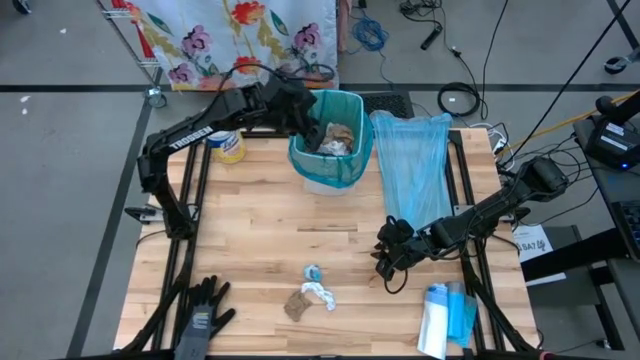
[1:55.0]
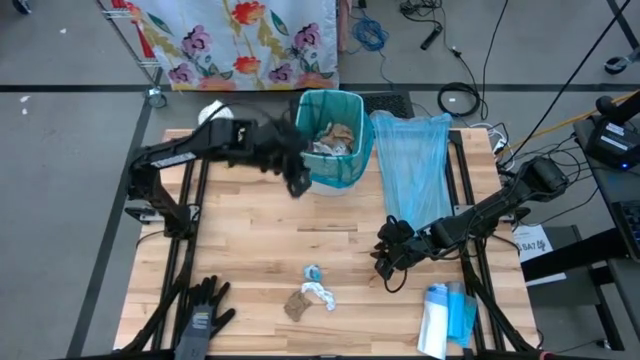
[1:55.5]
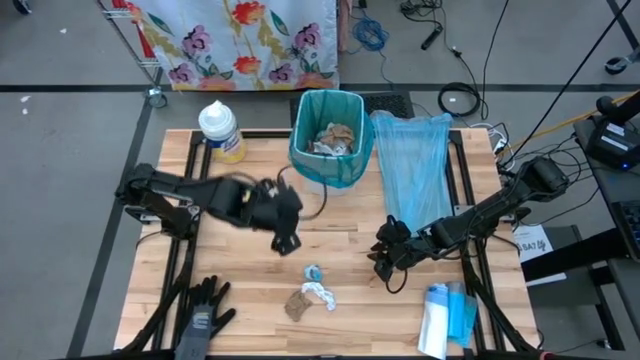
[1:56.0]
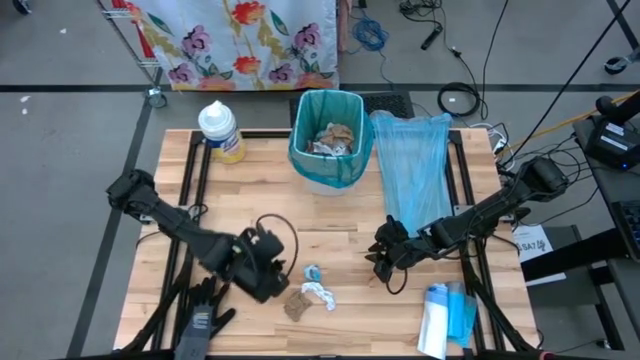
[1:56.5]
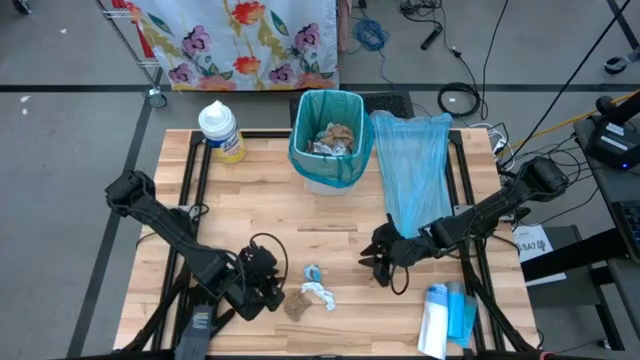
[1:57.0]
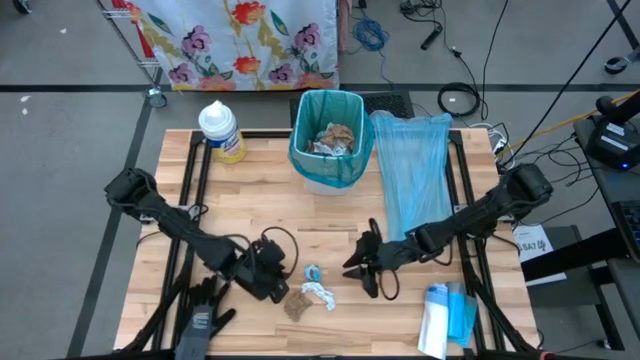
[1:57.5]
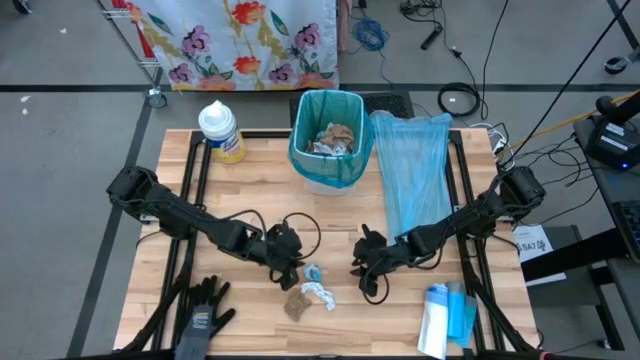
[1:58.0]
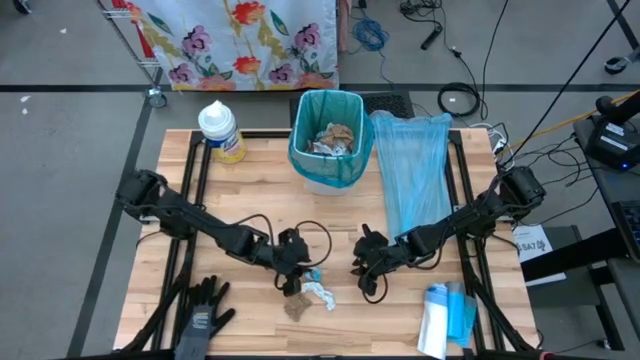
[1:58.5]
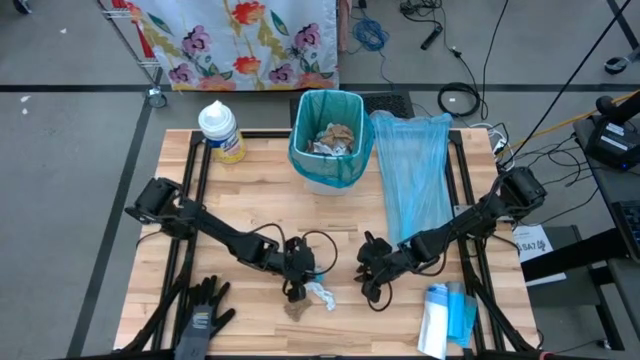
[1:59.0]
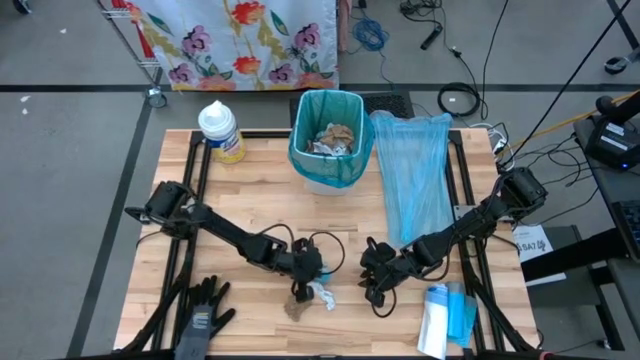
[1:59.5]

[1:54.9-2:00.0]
Task: place trash/remove bag and relplace
Put the blue plastic into the trash bin

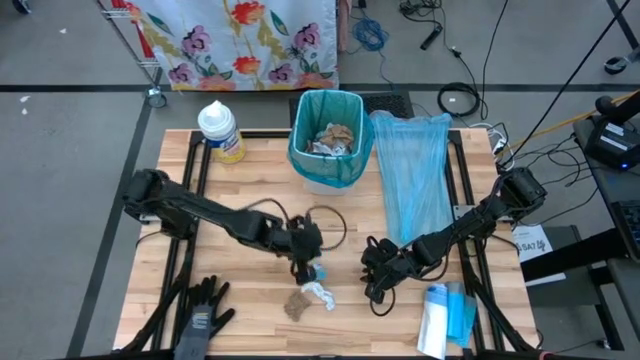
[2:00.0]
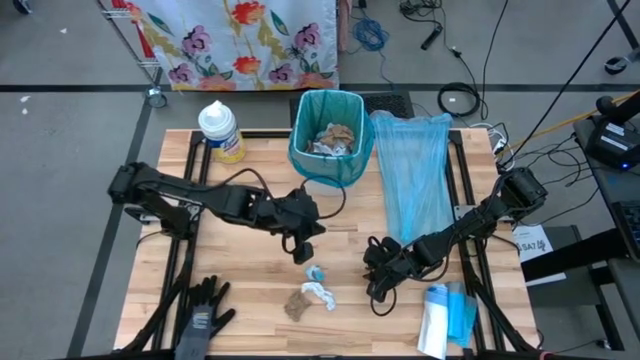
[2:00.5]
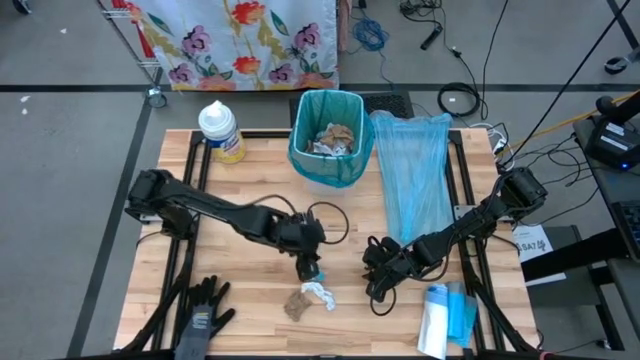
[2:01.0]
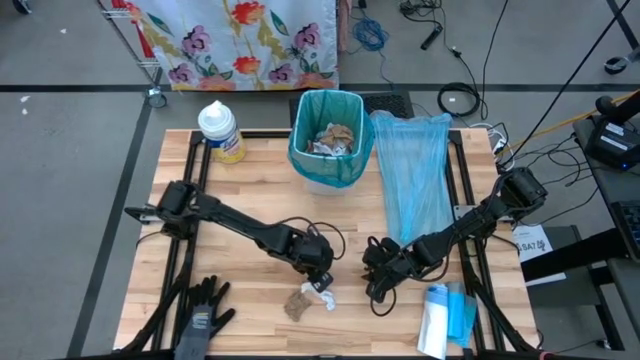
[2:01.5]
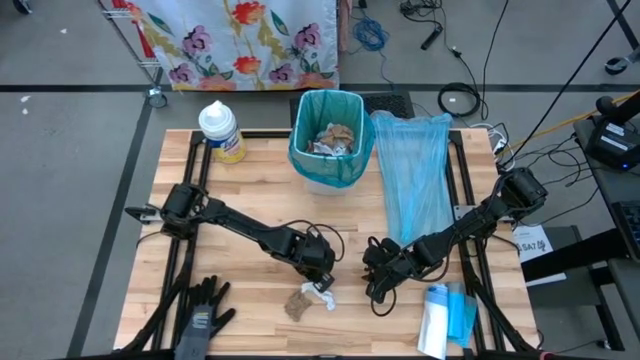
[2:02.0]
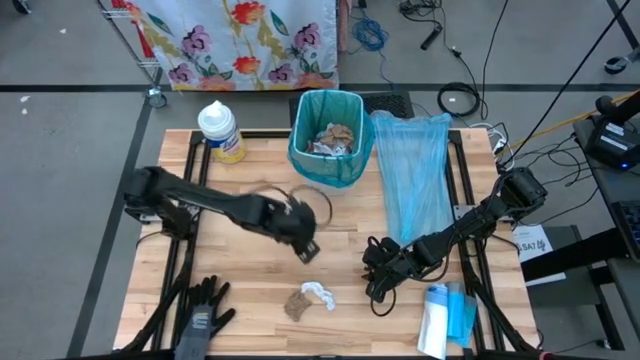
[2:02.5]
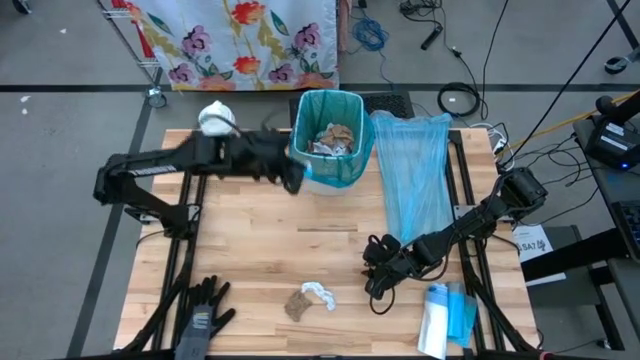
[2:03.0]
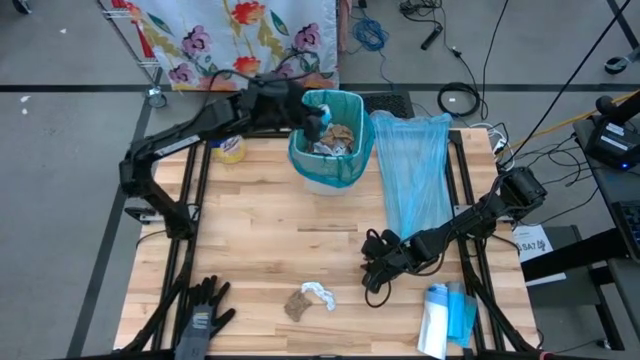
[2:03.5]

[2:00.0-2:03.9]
Put the blue plastic into the trash bin

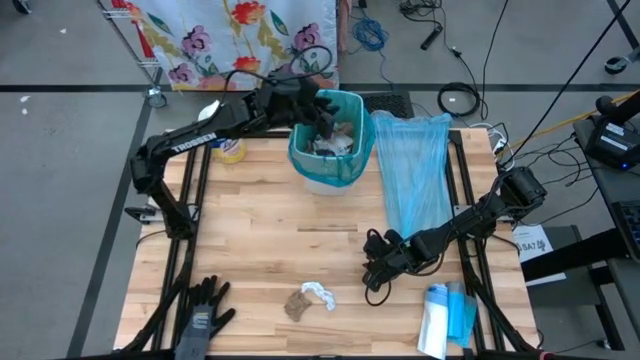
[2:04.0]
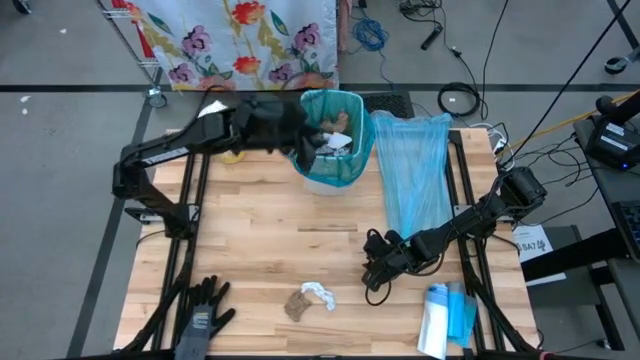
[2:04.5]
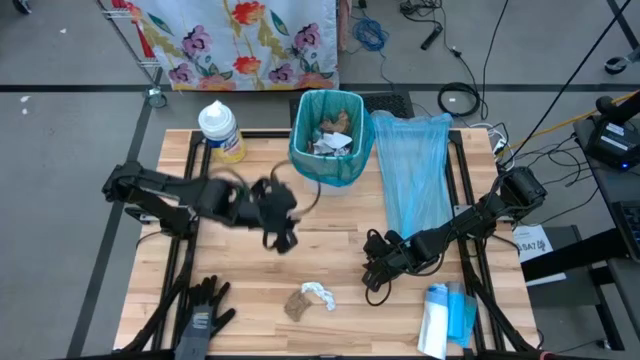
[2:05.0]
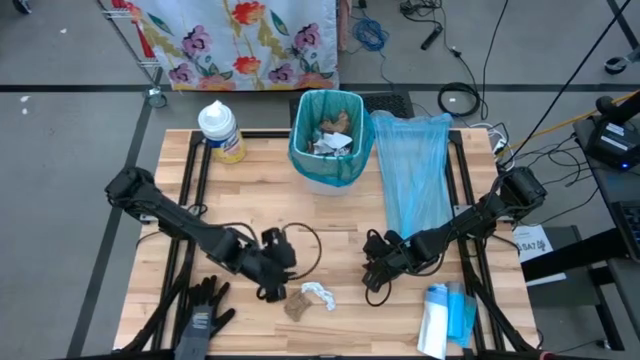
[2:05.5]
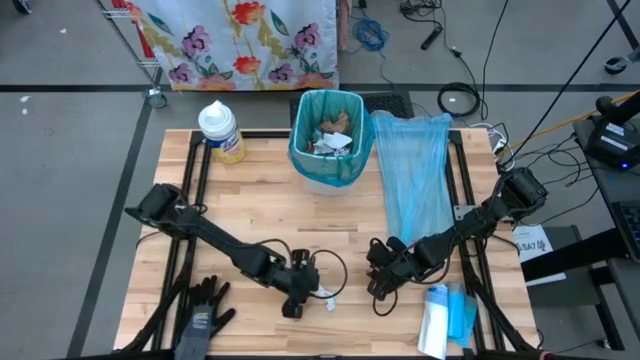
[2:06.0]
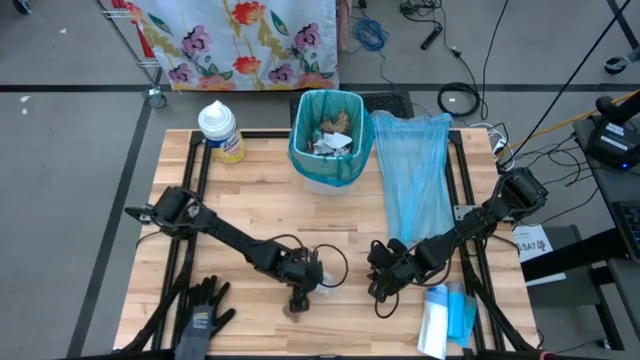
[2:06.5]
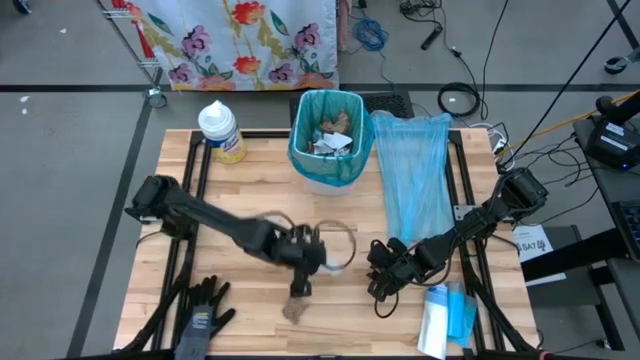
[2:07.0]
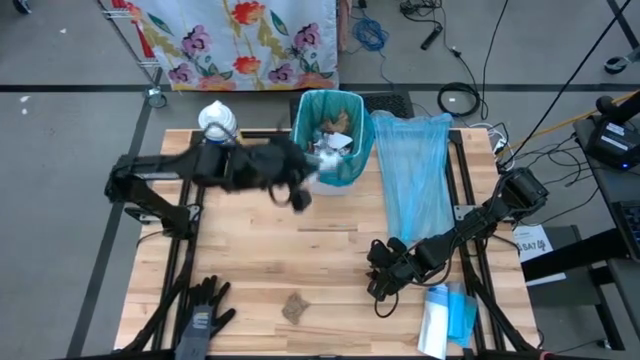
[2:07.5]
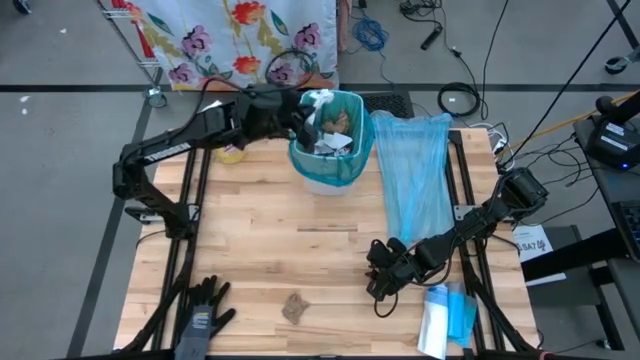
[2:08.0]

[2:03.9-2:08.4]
Put the white napkin into the trash bin

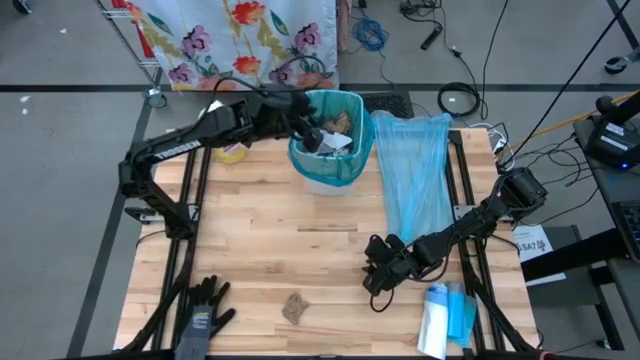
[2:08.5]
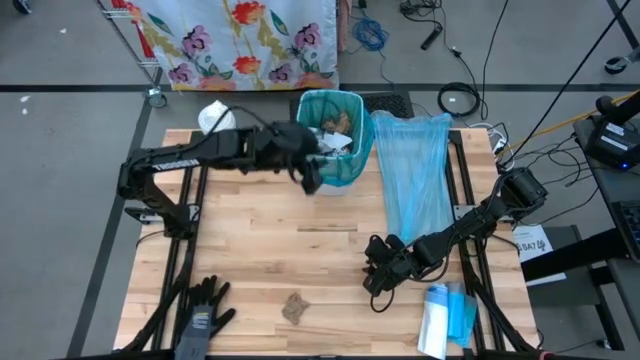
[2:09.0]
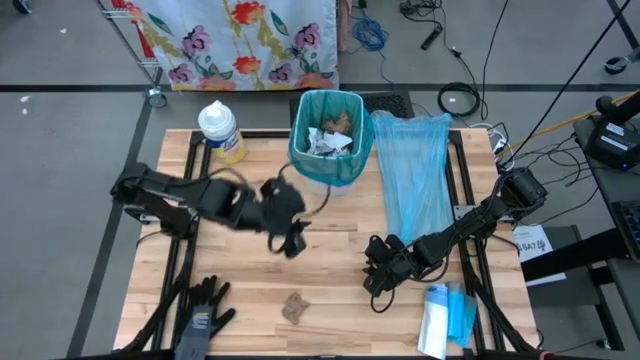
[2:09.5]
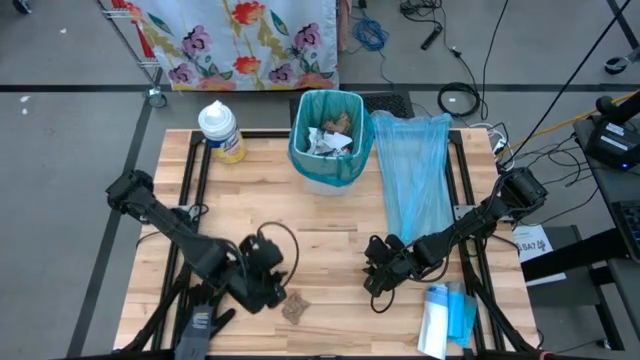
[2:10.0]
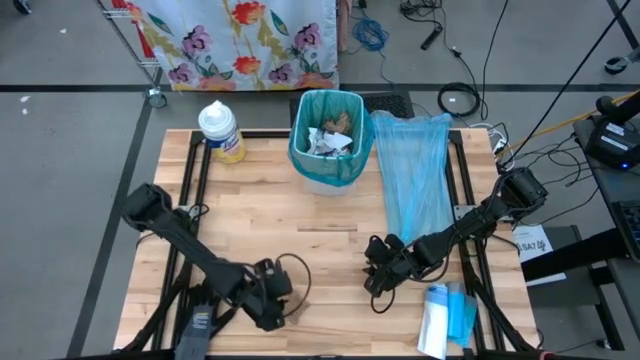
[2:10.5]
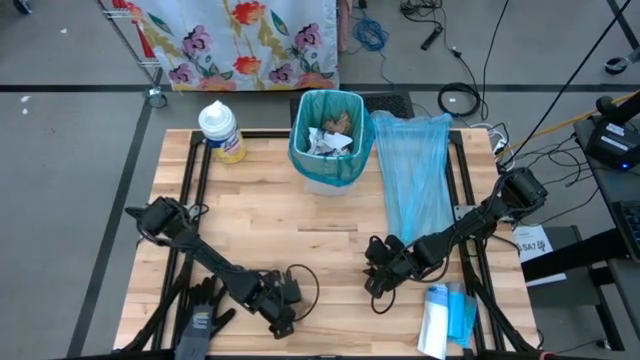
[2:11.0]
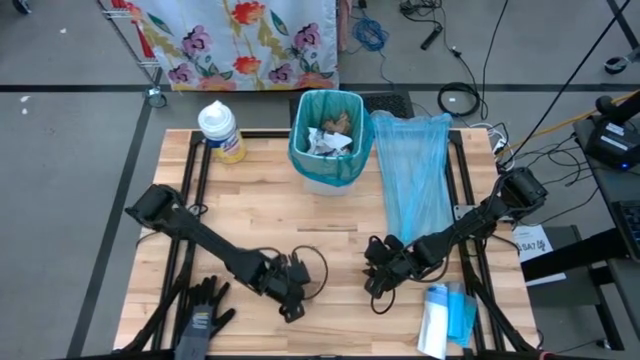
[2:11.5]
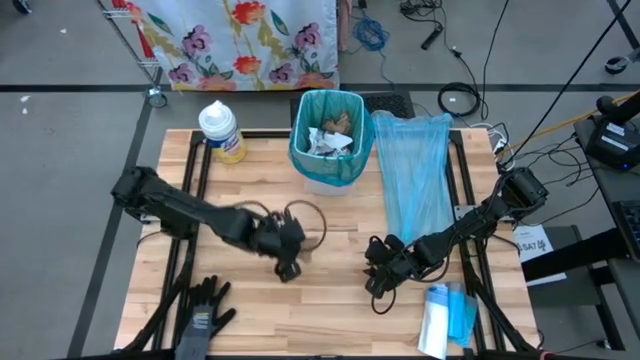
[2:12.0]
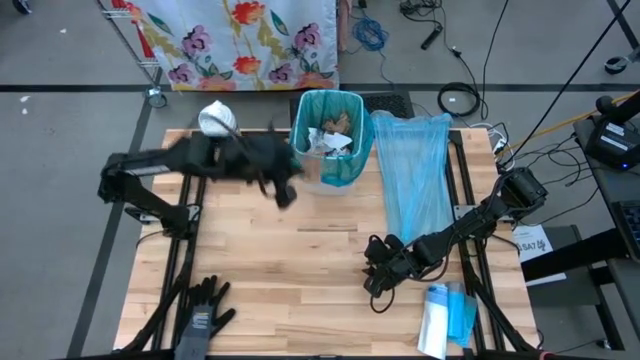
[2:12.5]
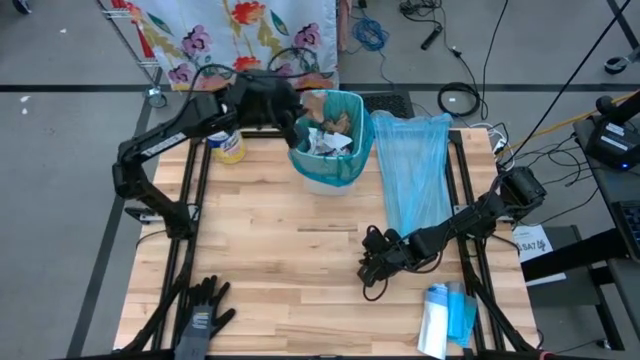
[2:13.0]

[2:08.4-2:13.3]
Put the brown napkin into the trash bin

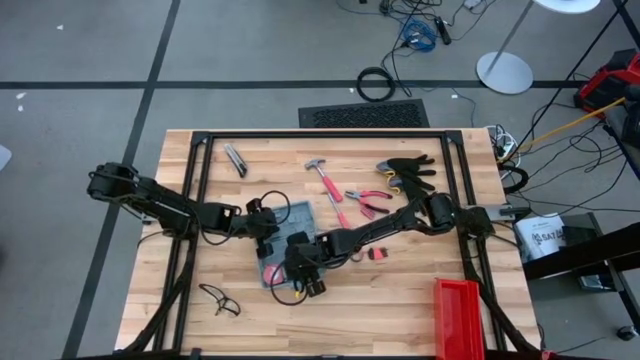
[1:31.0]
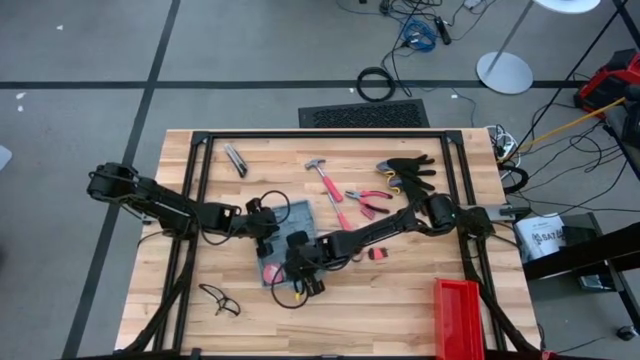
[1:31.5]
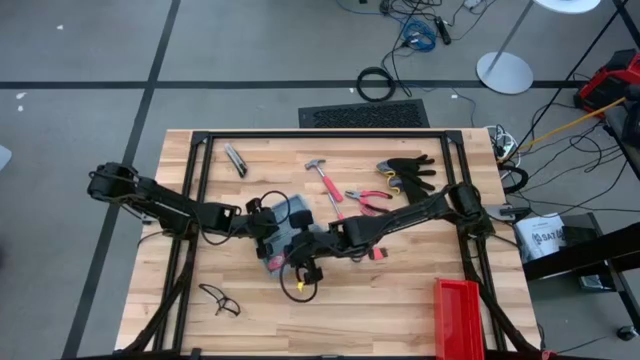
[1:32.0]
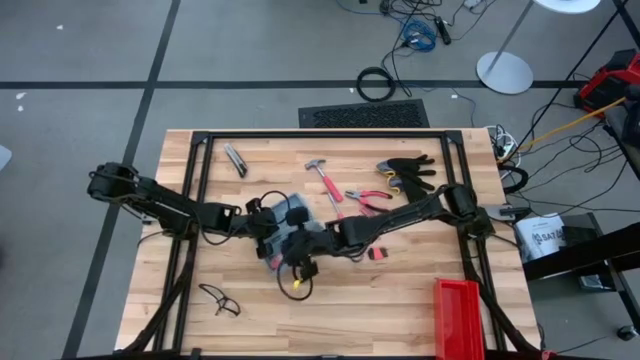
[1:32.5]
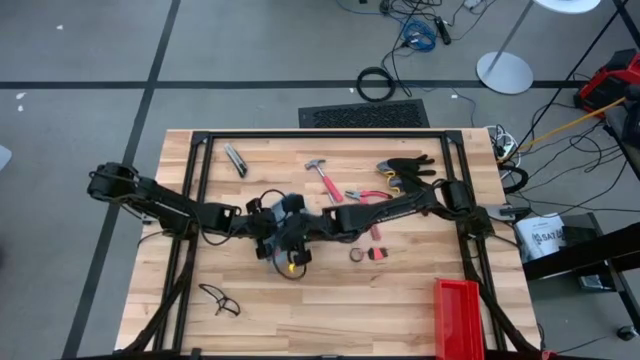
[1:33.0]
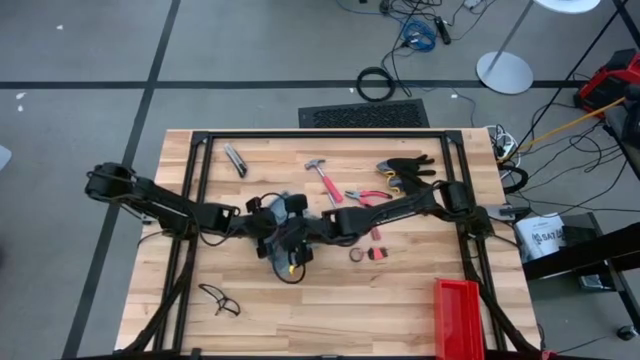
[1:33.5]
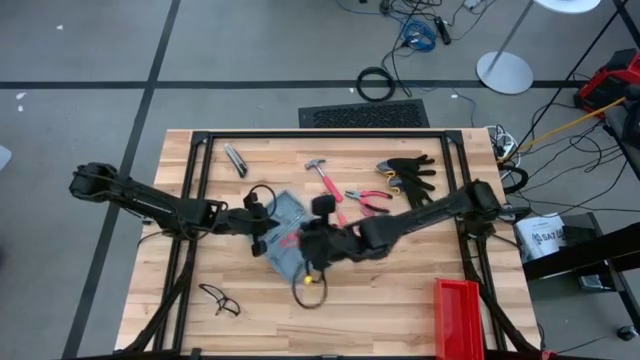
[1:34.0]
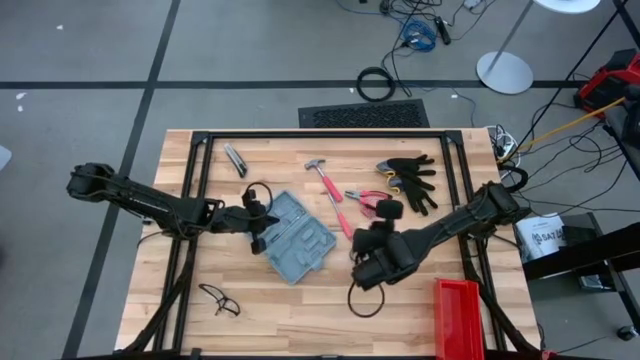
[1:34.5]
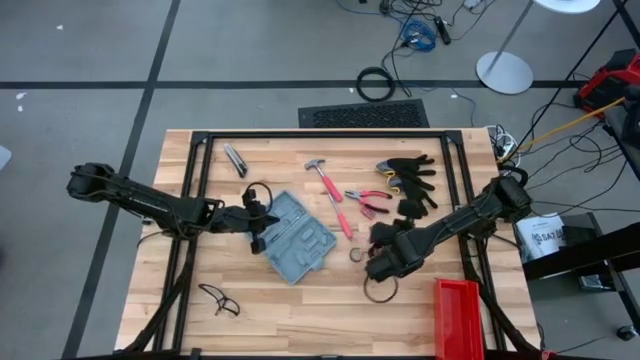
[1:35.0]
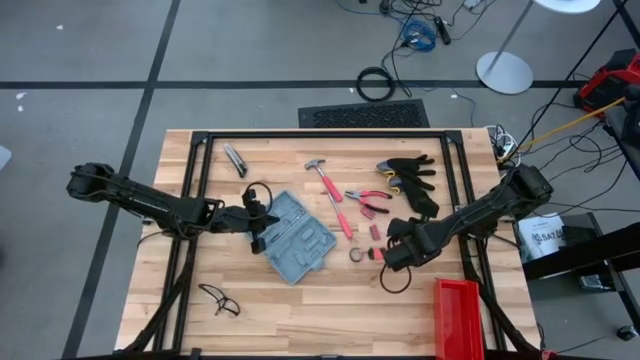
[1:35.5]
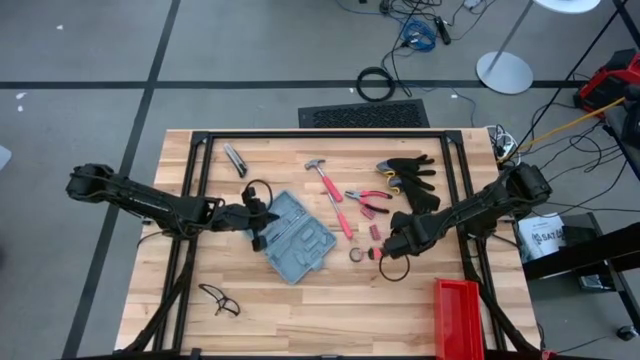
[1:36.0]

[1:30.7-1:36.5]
Task: prefit tool cases
Remove the pink tape measure from the gray prefit tool case
